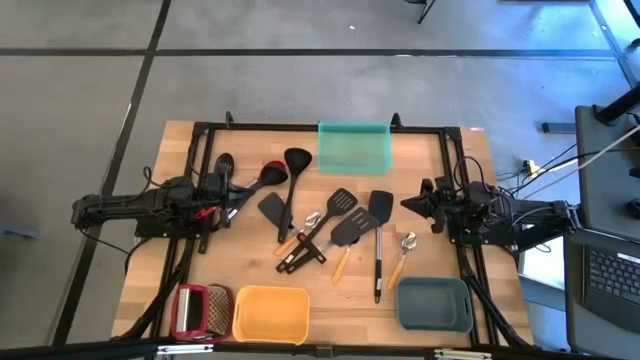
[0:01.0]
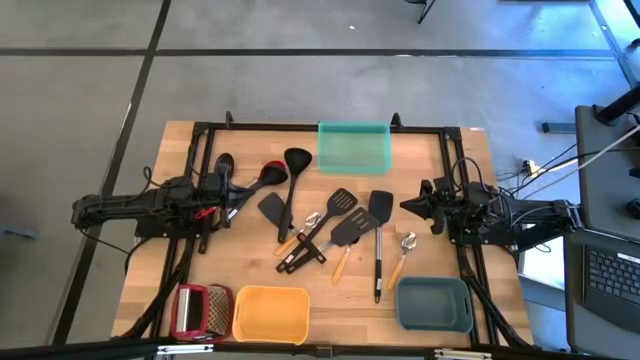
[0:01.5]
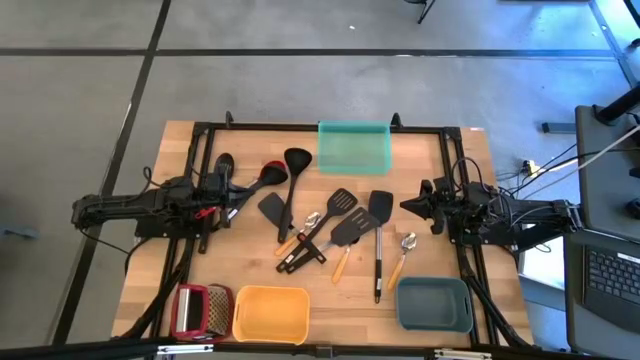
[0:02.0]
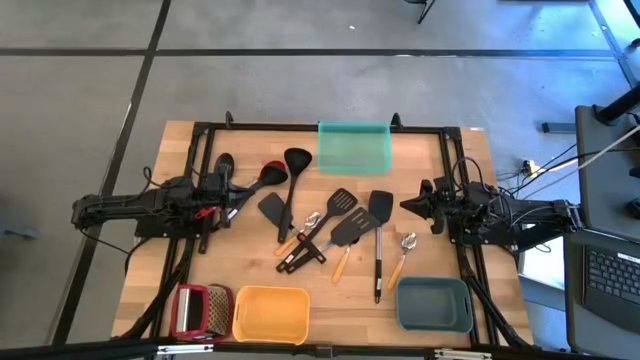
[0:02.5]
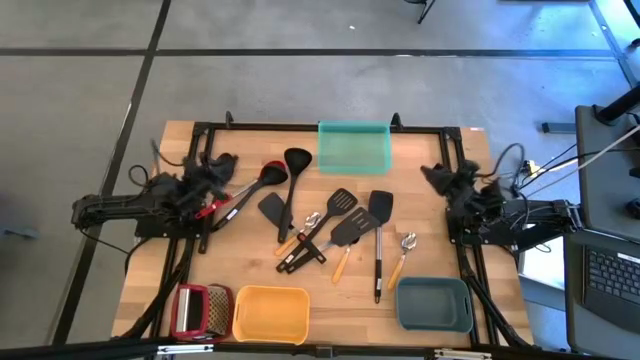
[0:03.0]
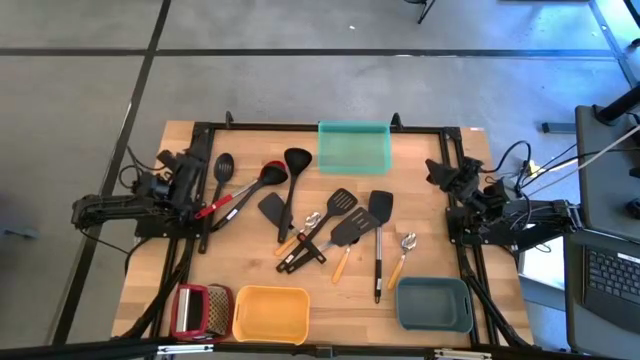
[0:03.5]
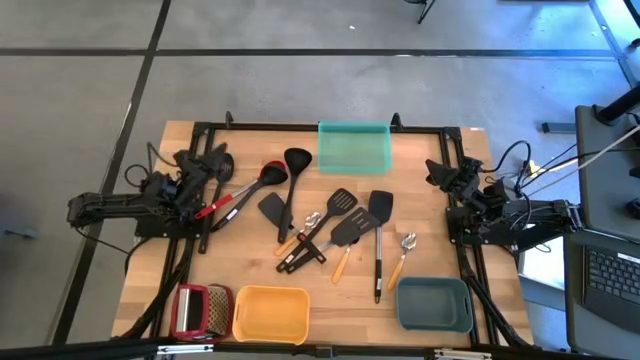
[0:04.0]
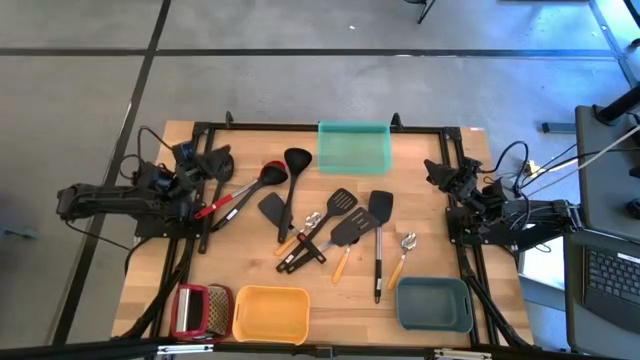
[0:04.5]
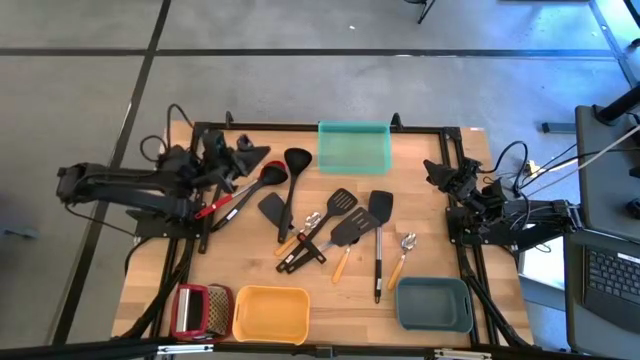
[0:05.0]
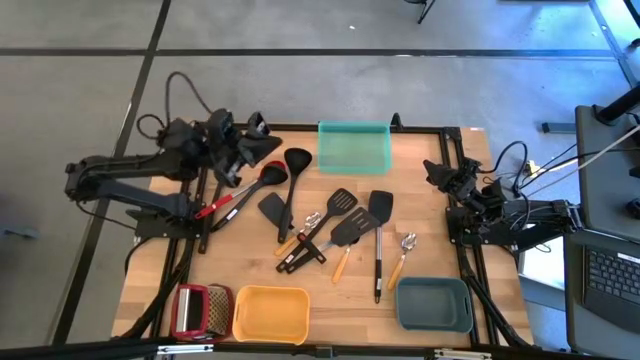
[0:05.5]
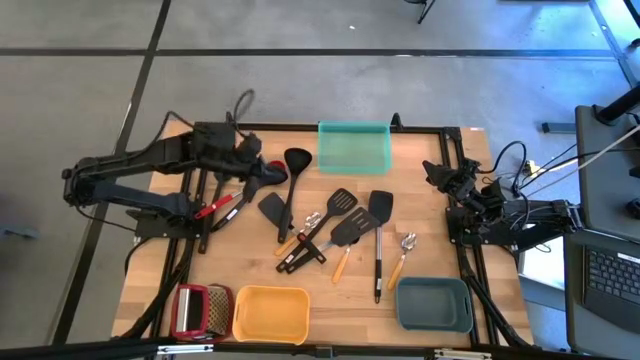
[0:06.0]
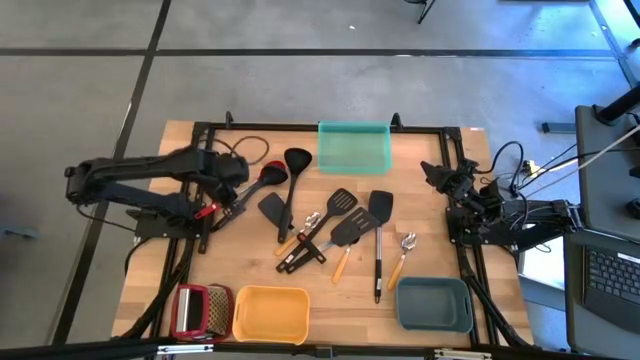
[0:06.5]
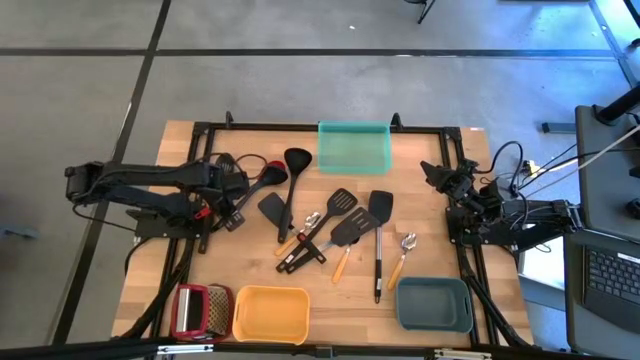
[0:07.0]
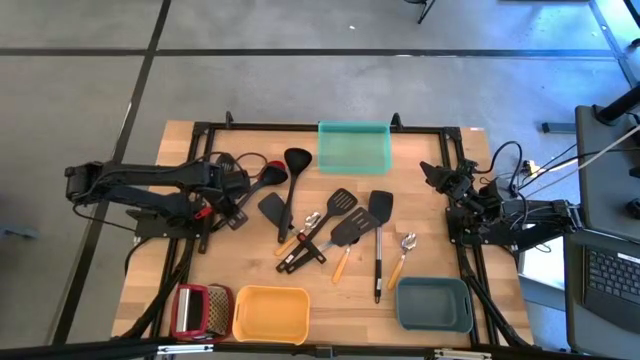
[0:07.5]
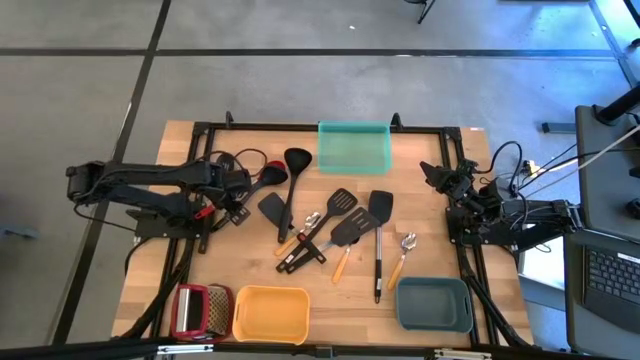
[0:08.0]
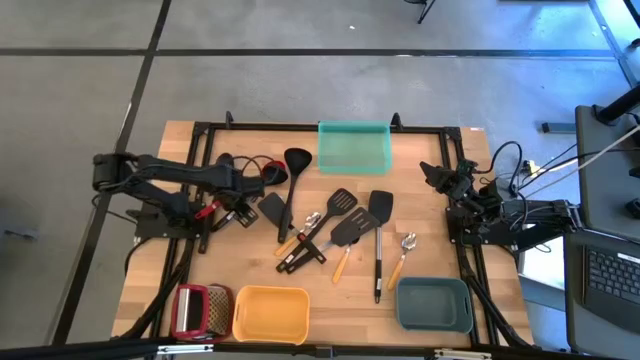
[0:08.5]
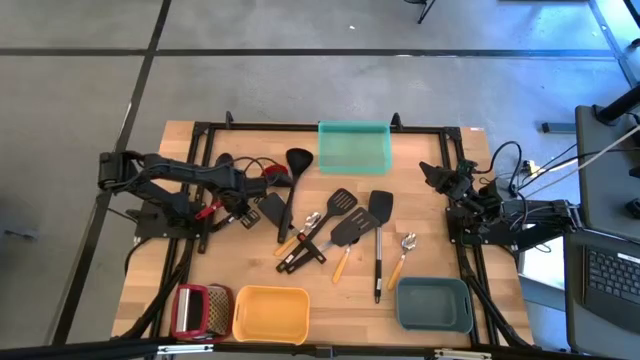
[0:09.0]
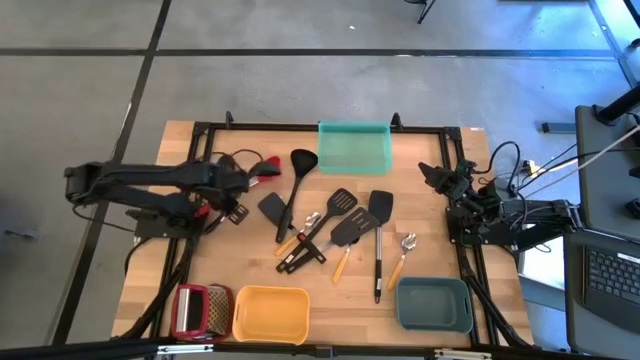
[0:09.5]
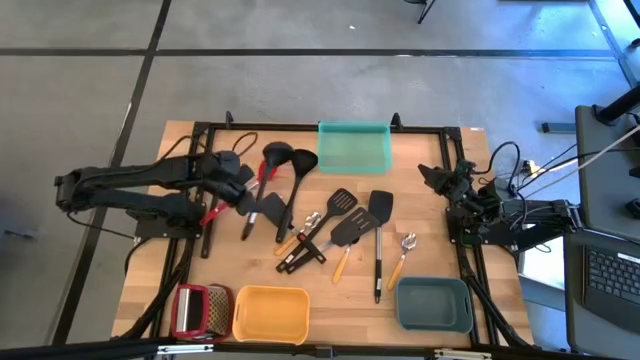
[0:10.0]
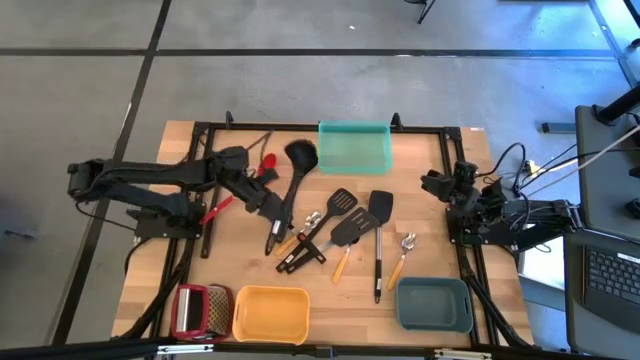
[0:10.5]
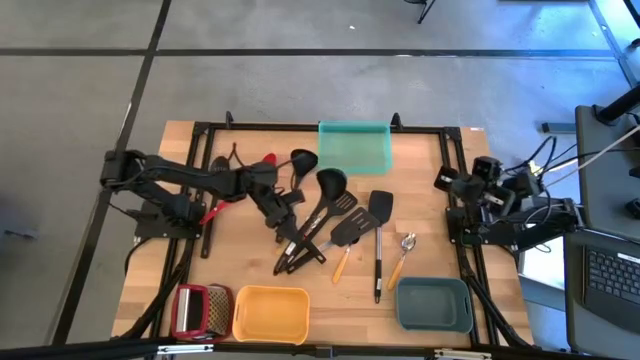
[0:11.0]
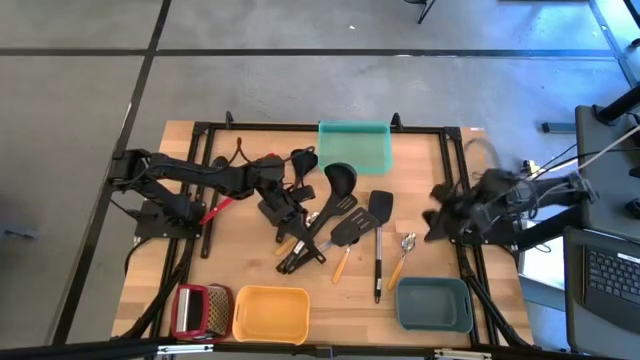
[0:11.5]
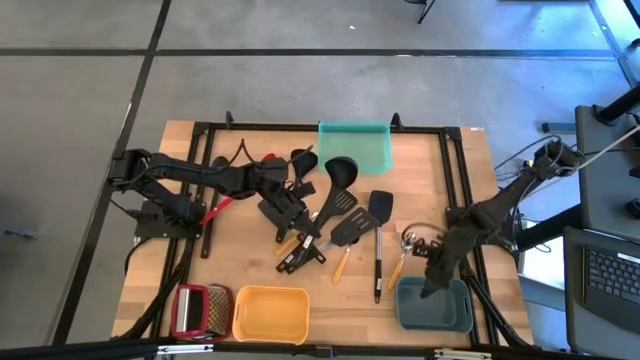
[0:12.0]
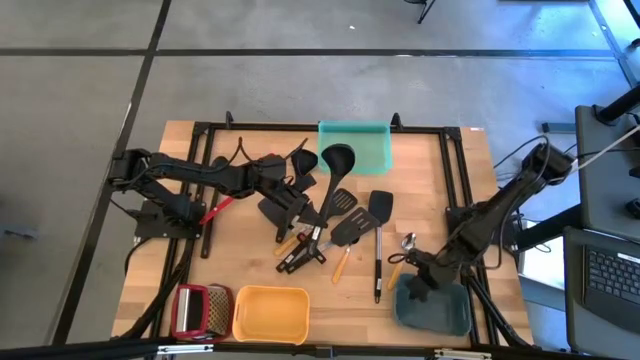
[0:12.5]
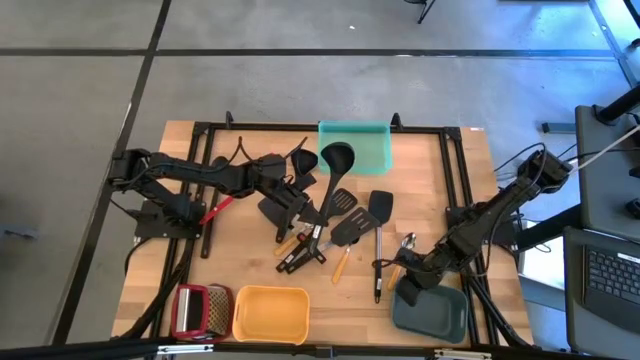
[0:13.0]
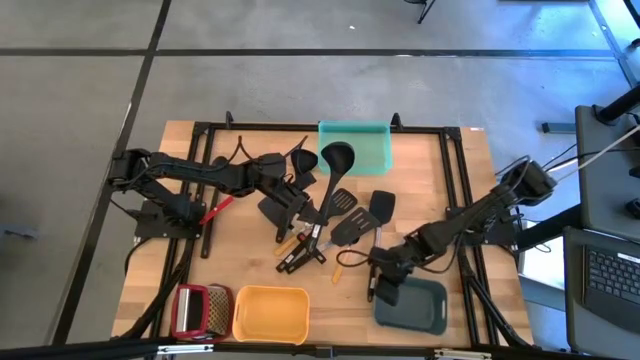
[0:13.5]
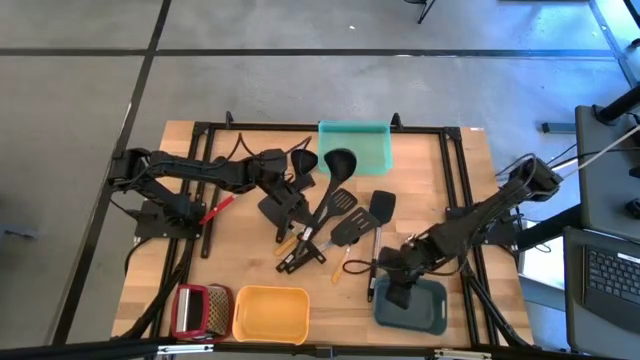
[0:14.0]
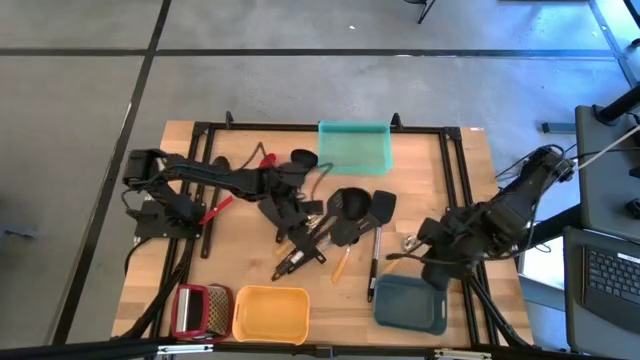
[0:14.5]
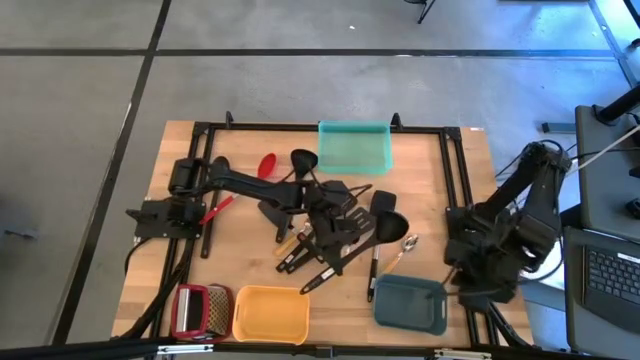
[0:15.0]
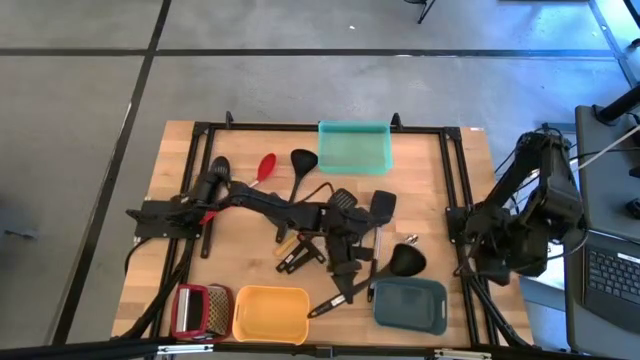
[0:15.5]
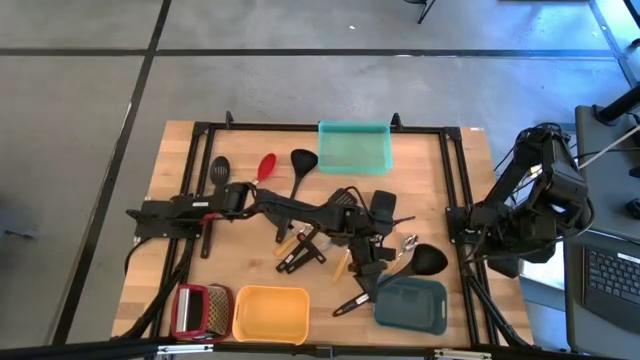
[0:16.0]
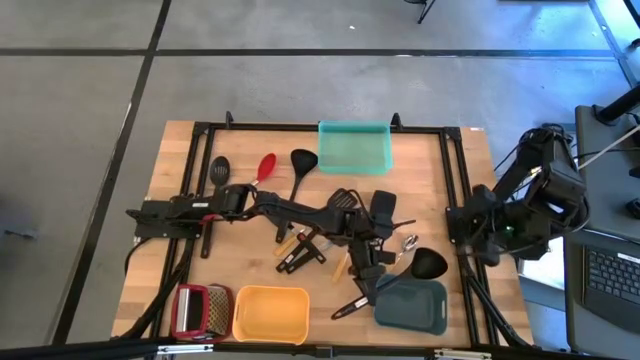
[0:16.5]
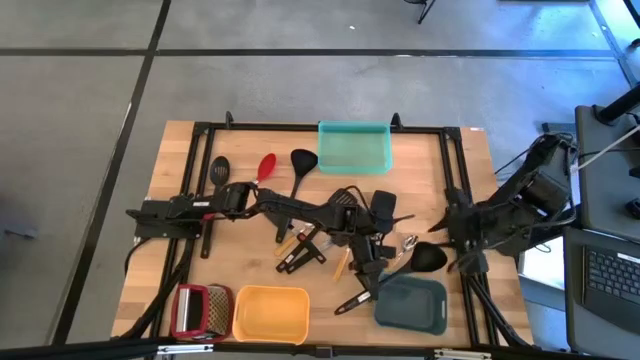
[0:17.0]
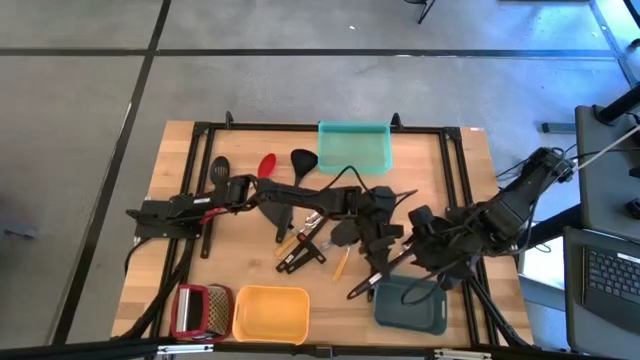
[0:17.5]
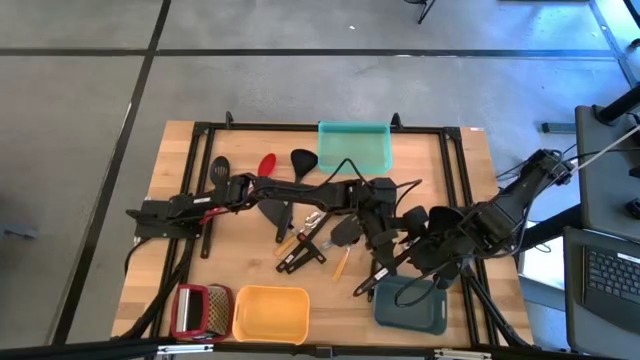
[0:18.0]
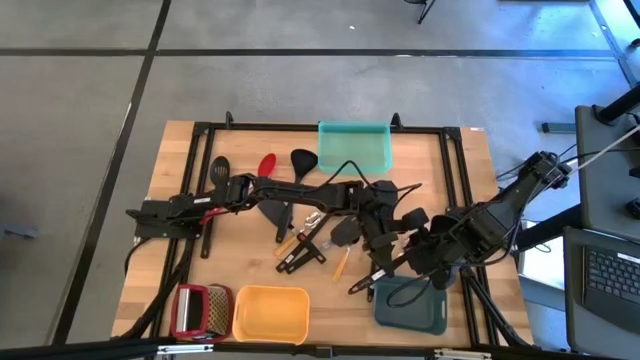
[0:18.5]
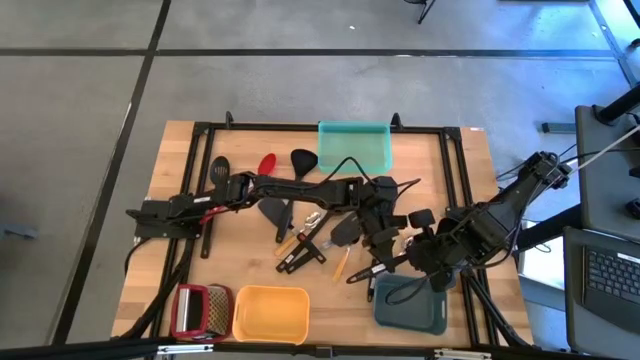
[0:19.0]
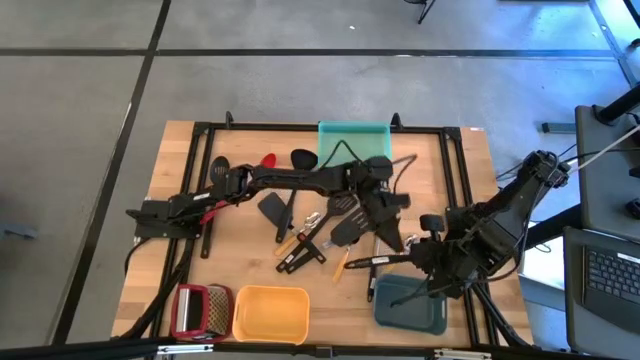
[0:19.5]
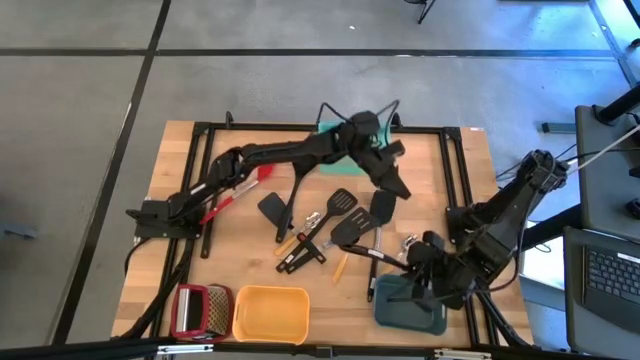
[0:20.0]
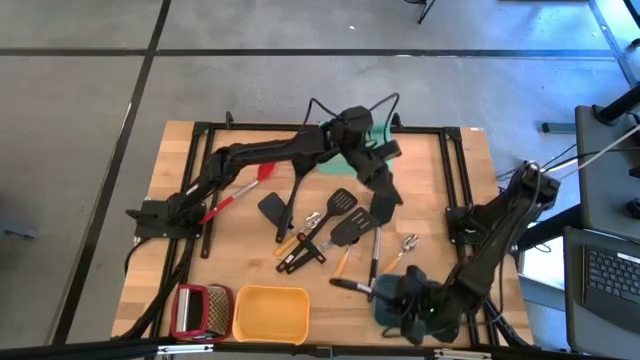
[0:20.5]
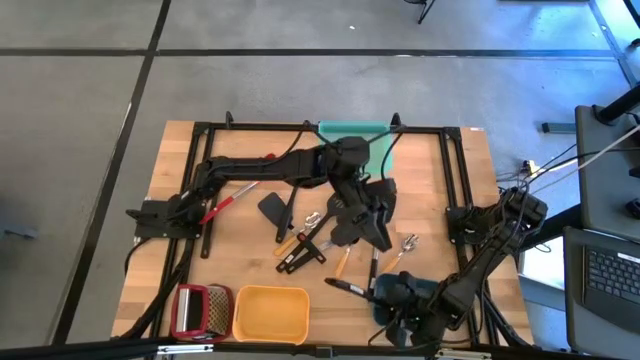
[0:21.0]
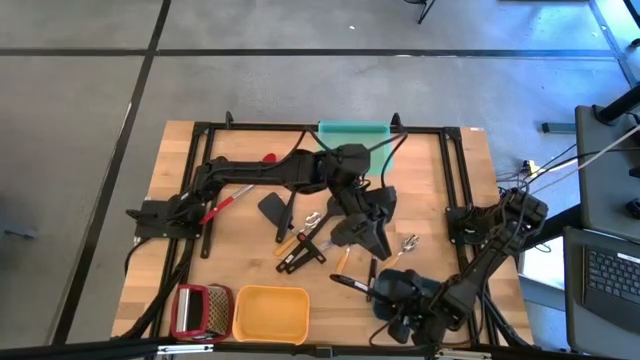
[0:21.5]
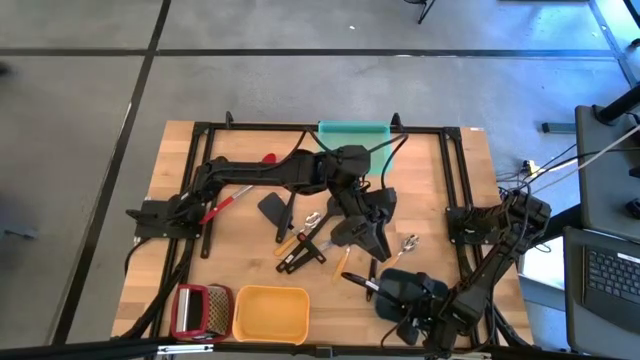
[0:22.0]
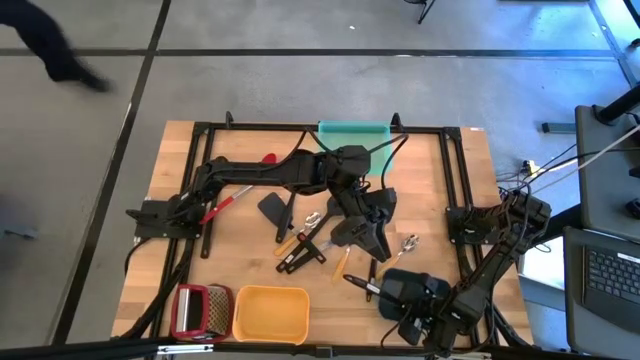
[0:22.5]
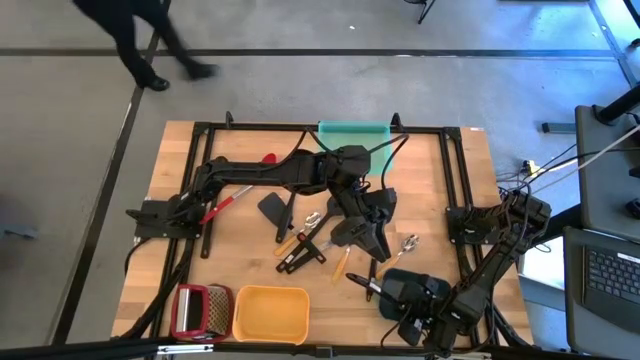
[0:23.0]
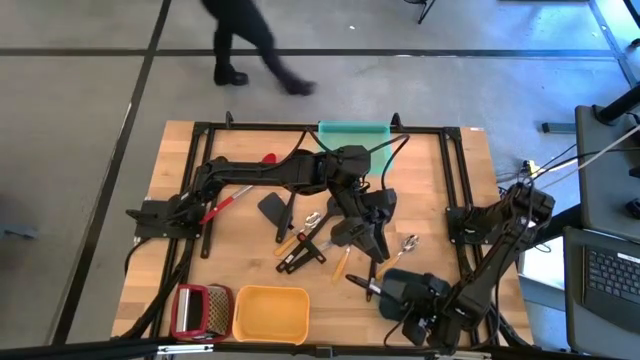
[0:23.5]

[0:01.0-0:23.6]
Task: Pick & Place Kitchen Items
Put the black serving spoon into the blue bin
